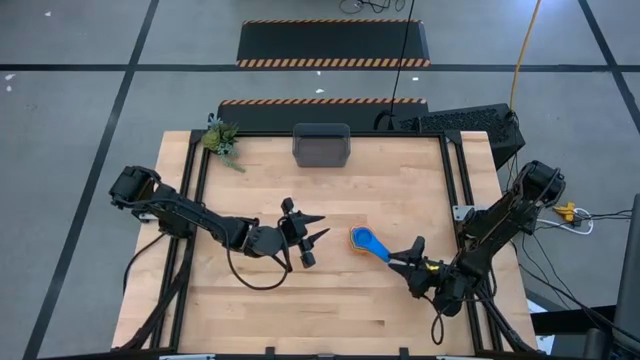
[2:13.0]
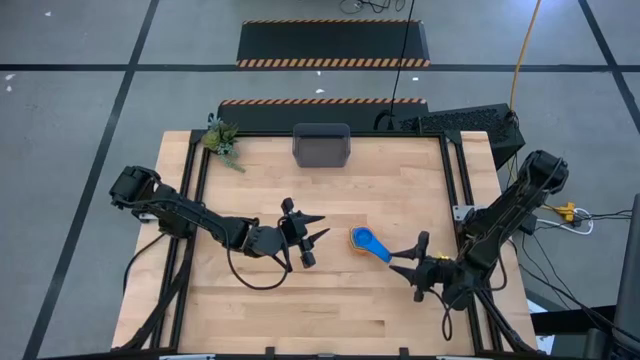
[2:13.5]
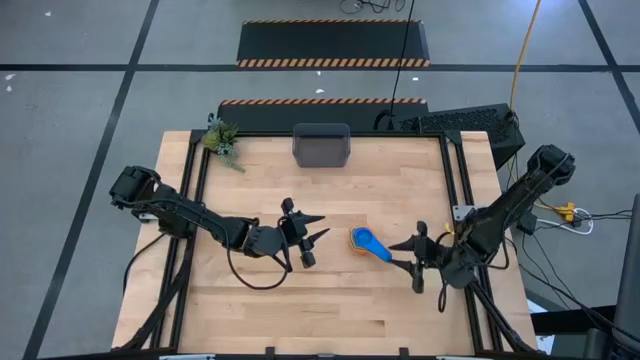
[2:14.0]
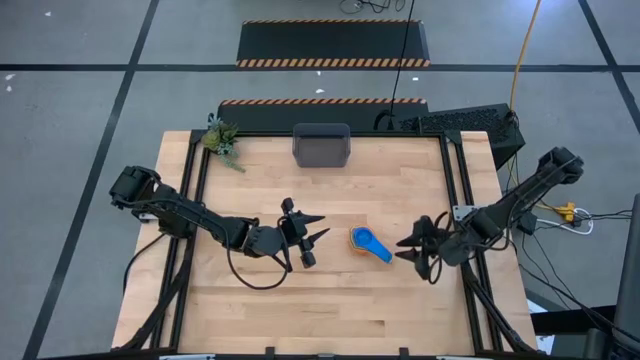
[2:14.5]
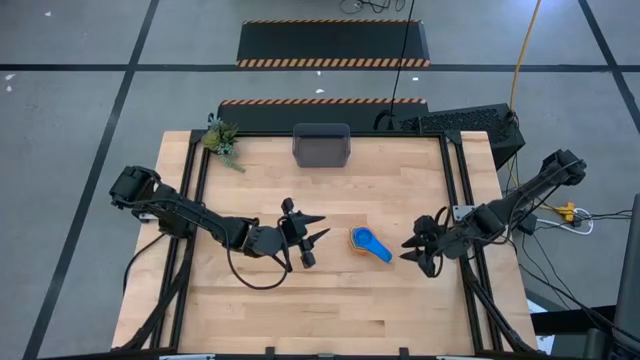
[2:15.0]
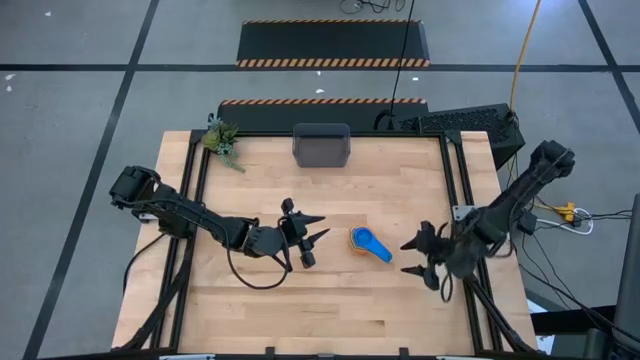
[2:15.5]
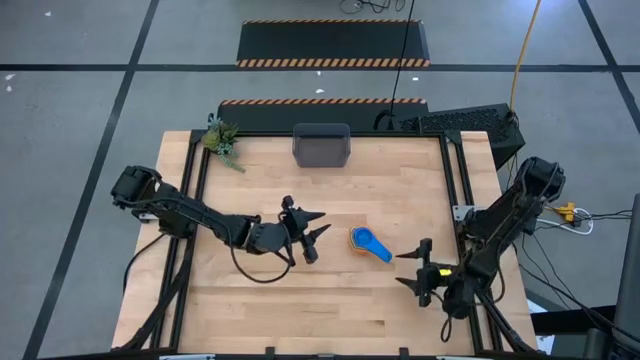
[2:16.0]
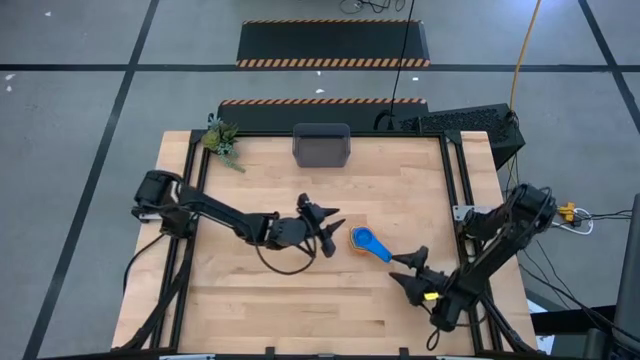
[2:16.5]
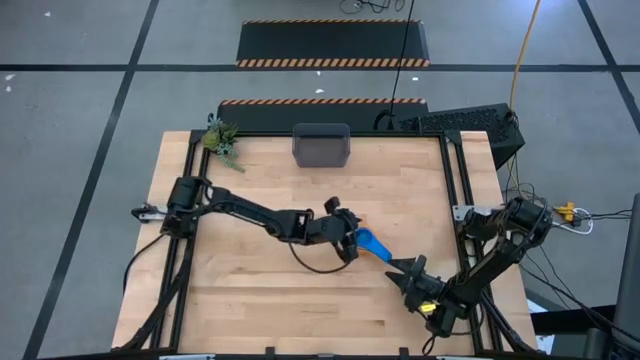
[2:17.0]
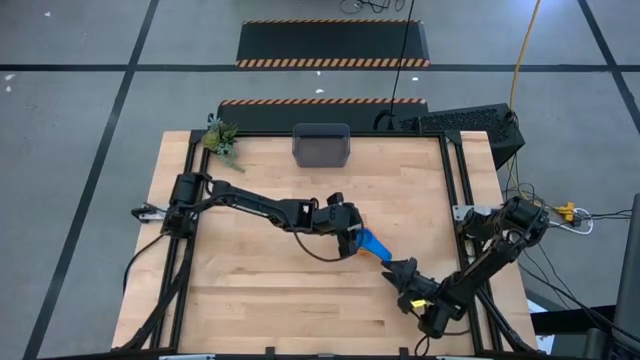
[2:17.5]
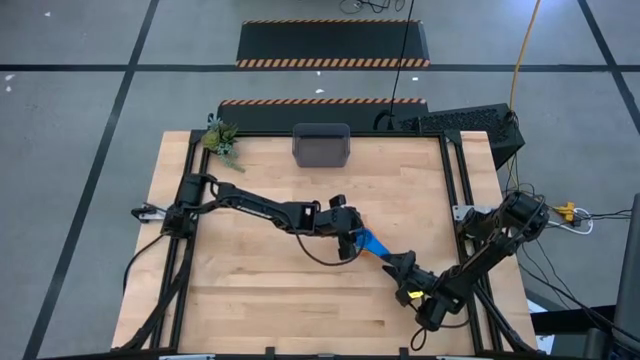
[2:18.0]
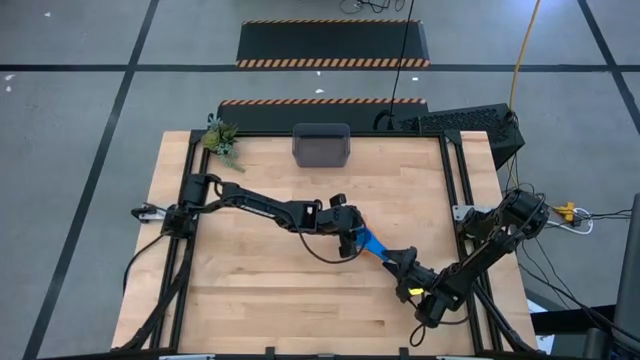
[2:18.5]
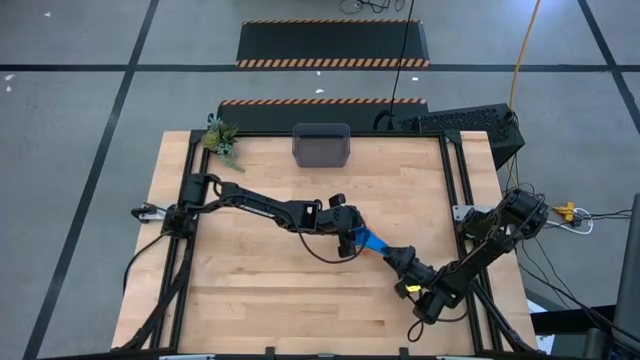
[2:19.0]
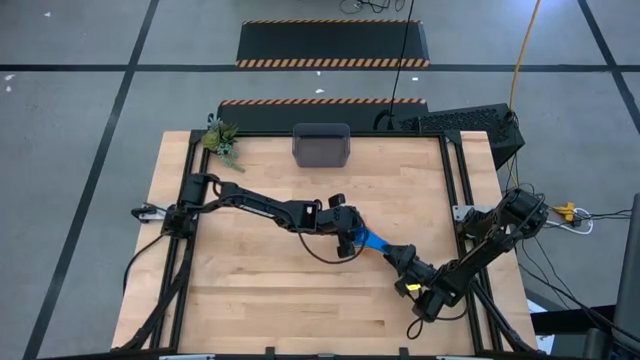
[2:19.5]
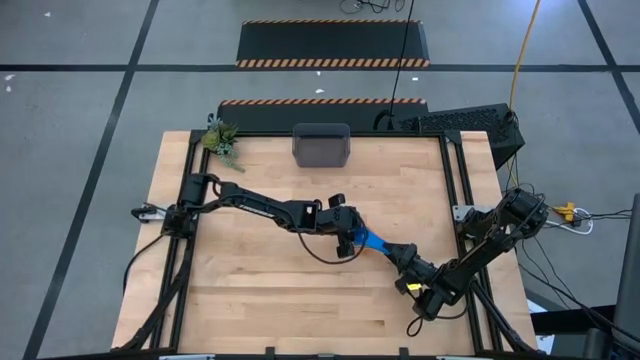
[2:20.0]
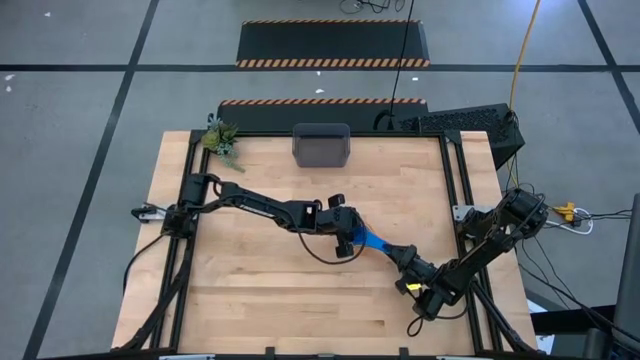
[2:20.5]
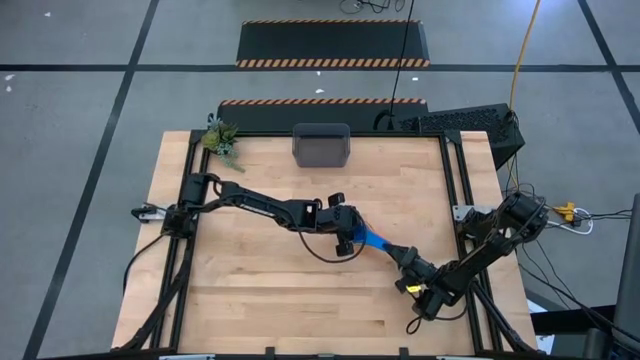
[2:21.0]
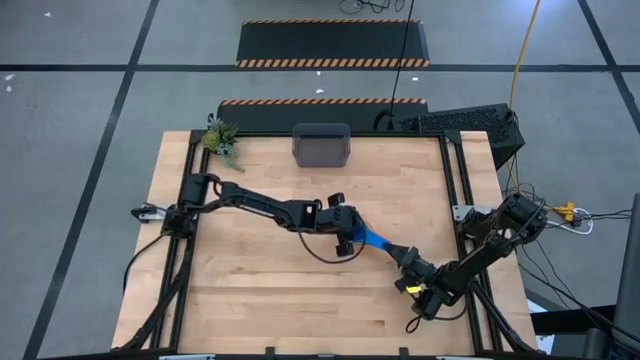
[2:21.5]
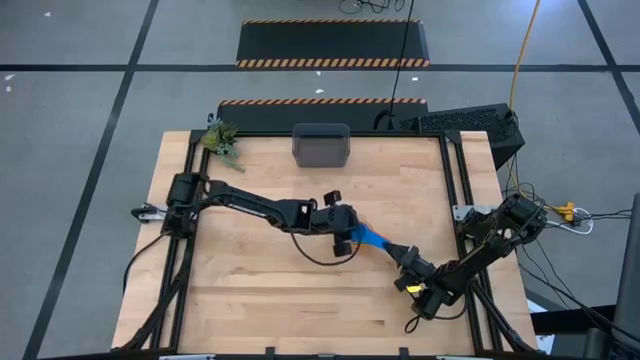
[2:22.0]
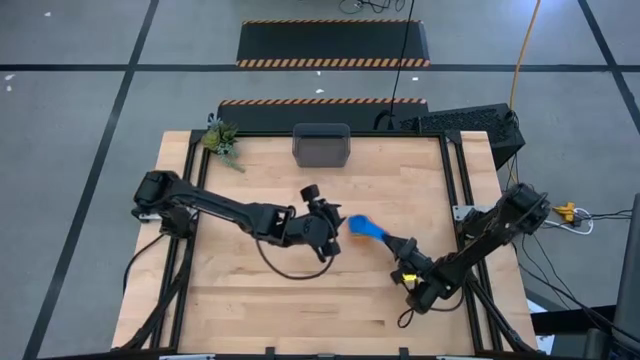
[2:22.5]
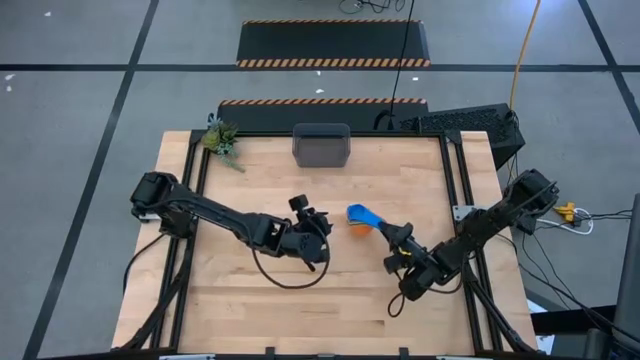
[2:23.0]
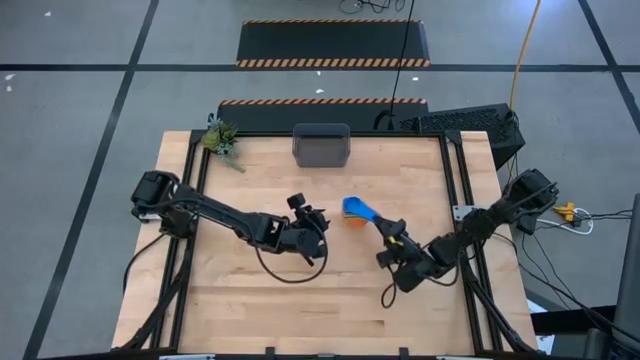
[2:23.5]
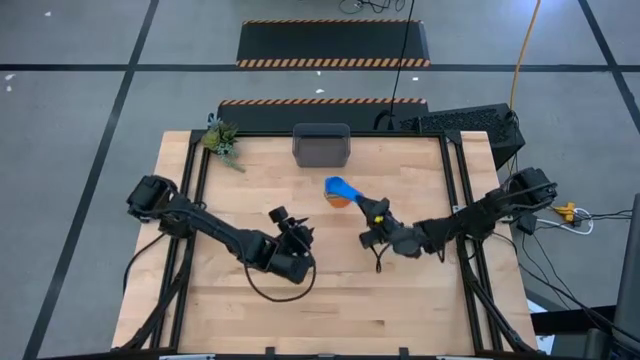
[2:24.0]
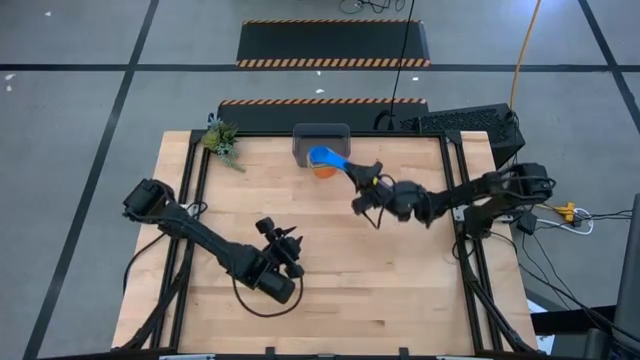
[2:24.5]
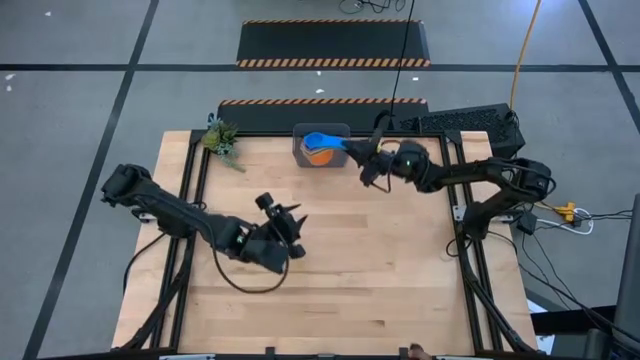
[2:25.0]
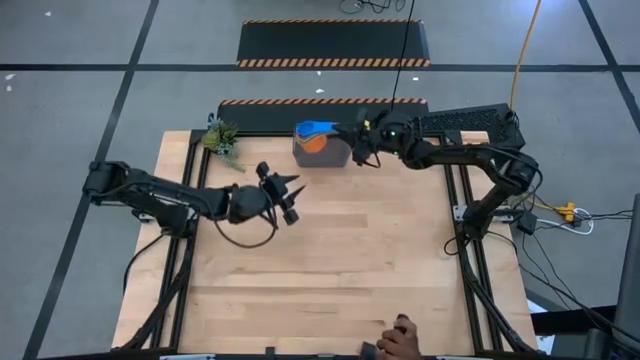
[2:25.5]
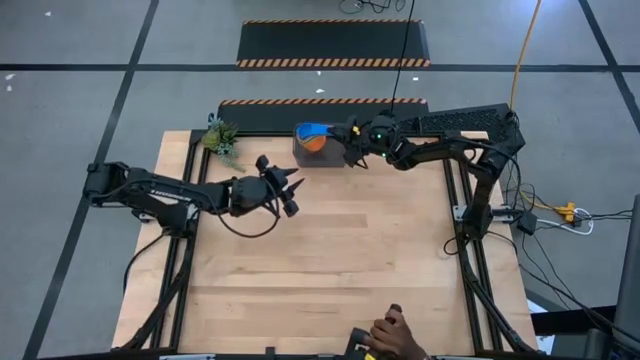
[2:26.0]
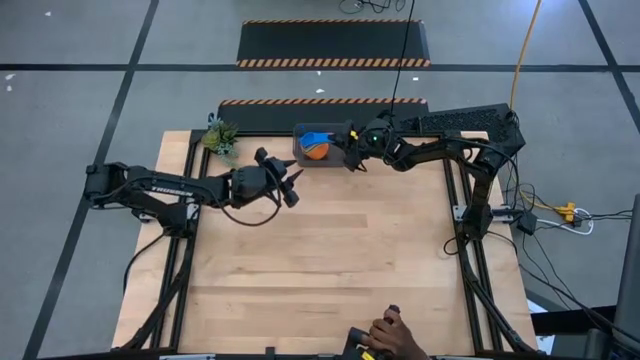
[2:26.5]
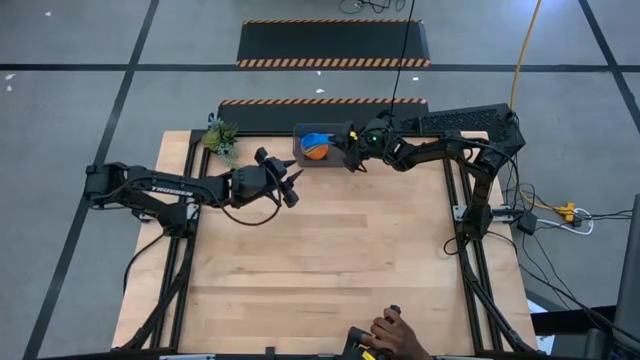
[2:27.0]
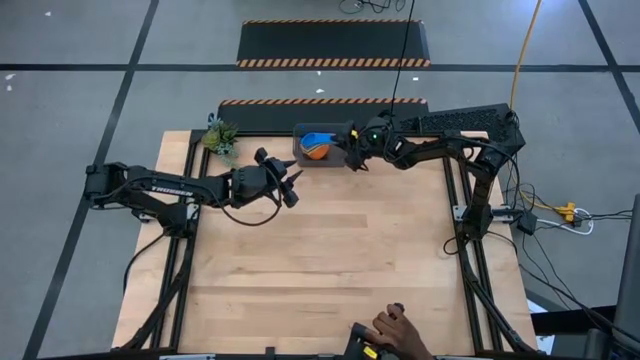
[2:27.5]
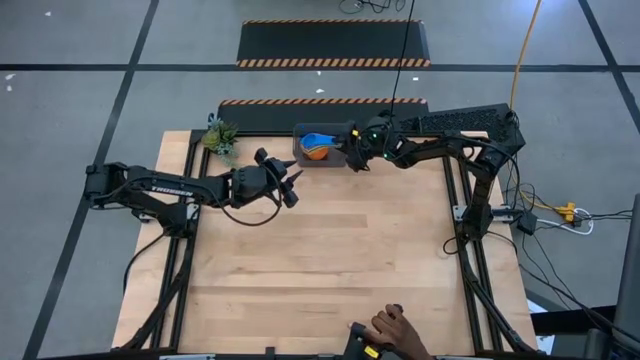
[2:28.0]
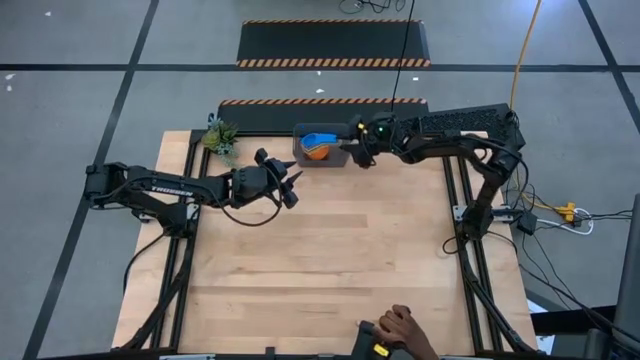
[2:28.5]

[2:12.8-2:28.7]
Task: Nest measuring cups in basket
Put the stacked measuring cups into the bin

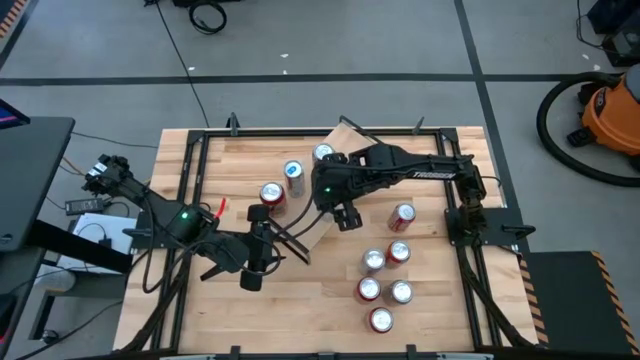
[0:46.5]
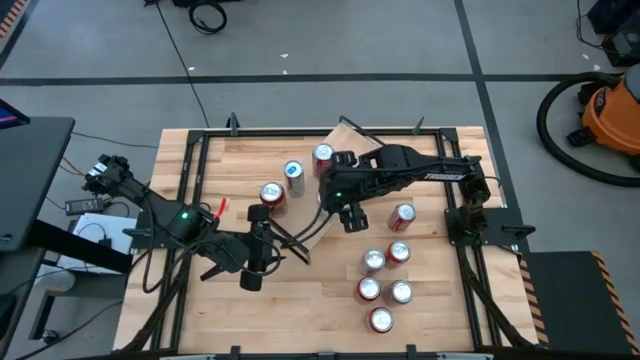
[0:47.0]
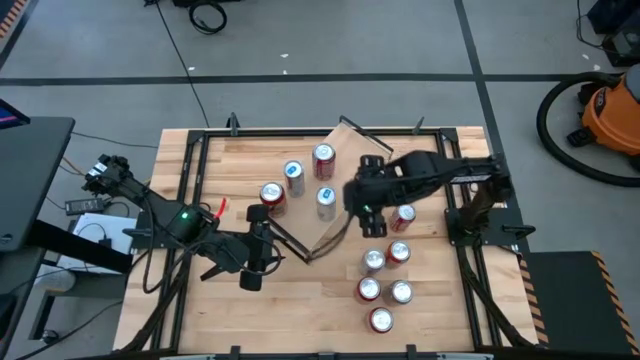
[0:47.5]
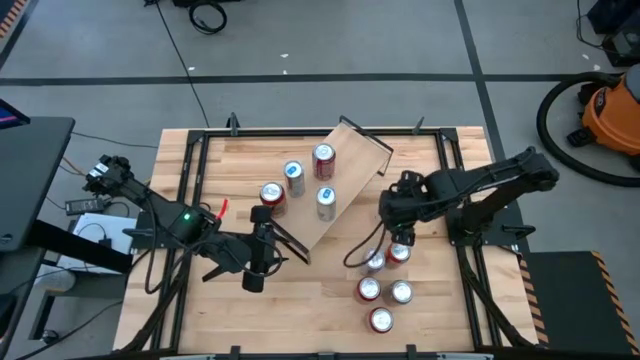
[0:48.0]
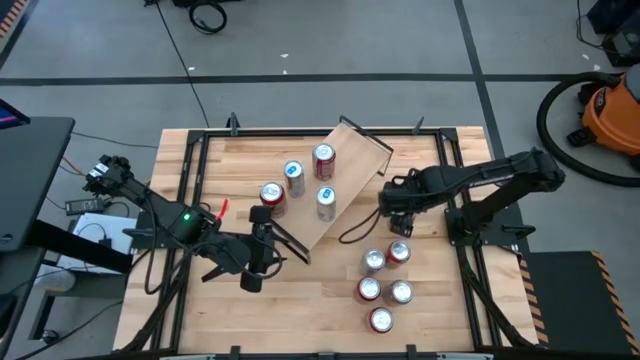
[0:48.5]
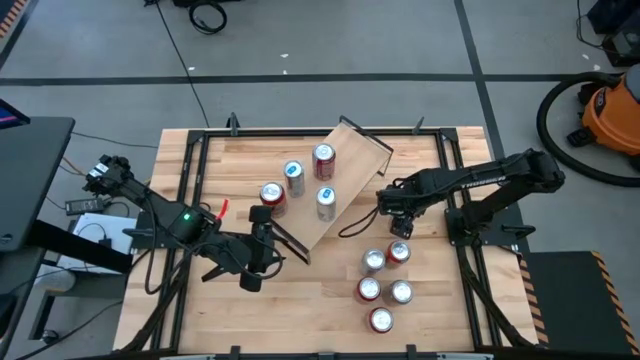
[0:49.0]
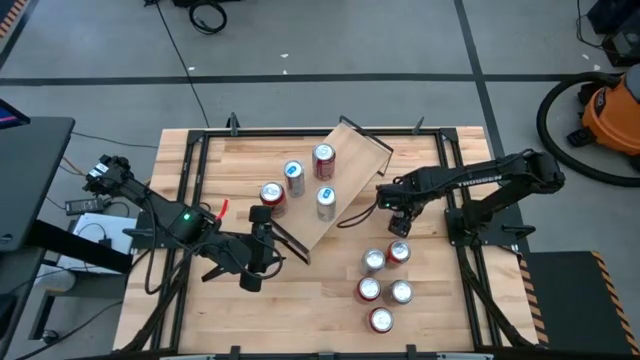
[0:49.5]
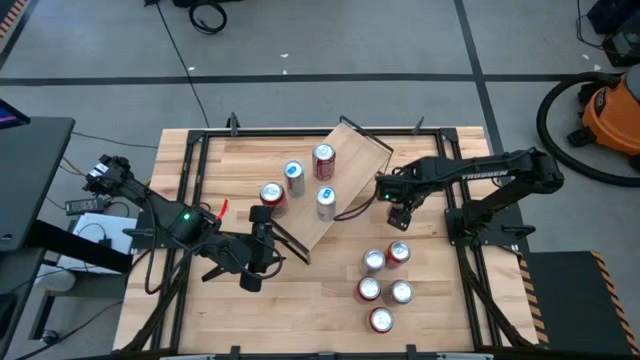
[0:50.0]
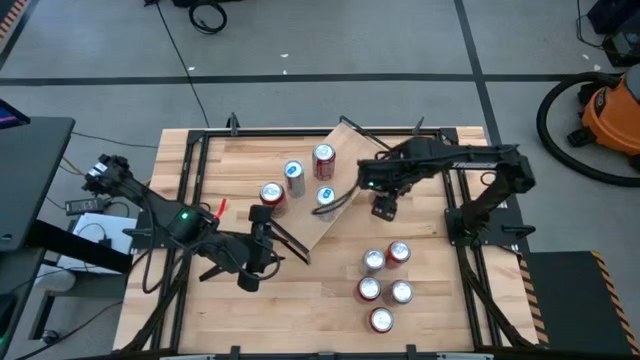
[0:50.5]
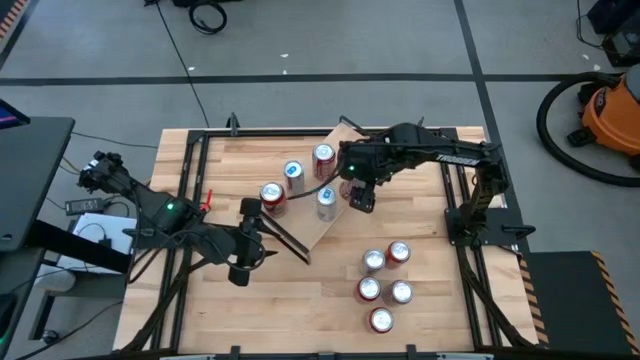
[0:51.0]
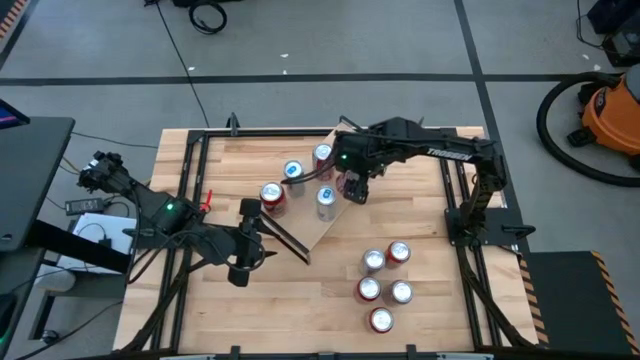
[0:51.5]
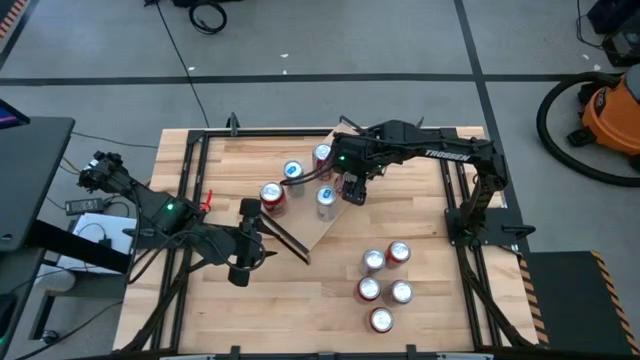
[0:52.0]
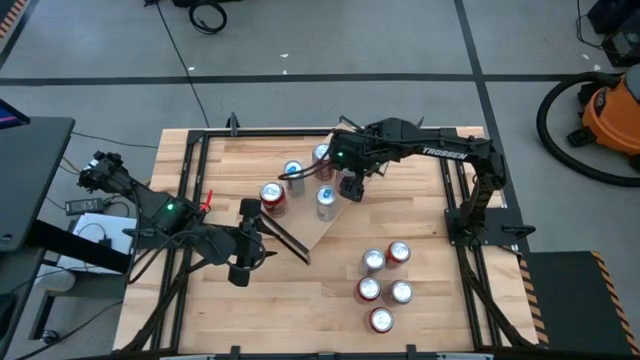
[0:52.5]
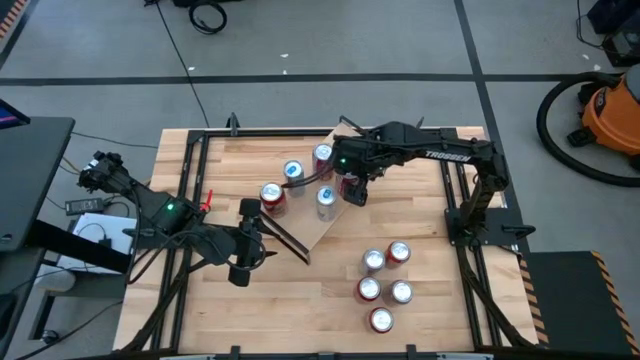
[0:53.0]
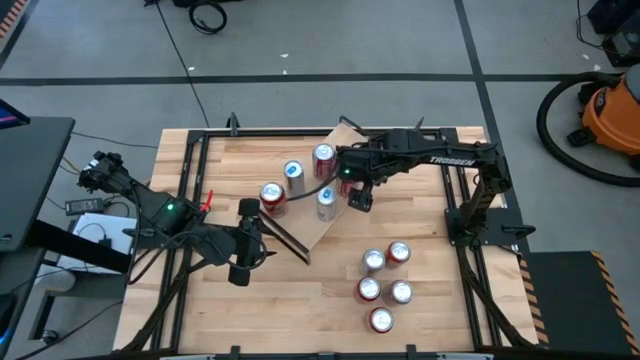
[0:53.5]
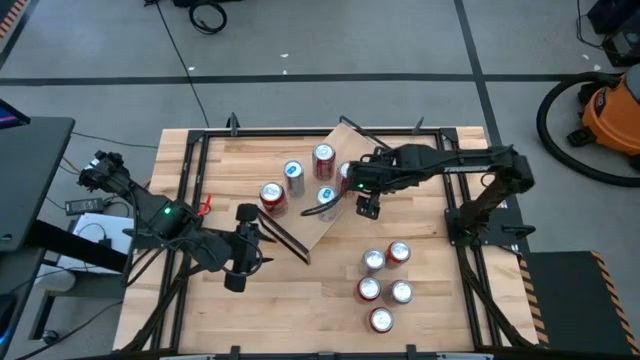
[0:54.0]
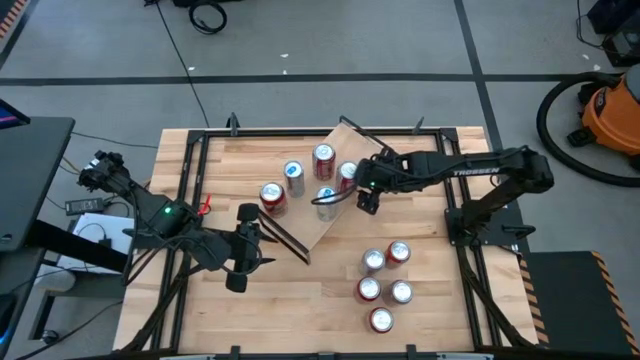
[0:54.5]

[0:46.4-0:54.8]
Task: Place canned beverage on shelf
Put the red-white soda can on the shelf aligned with the other red-white soda can
